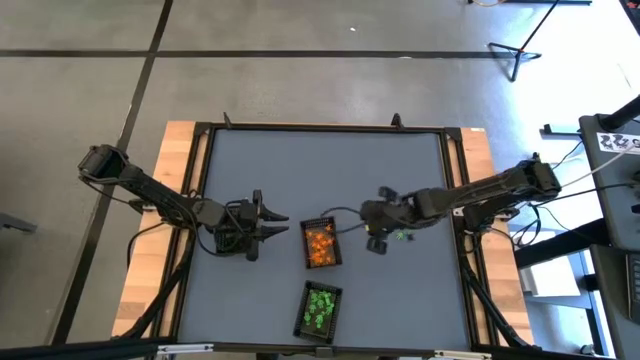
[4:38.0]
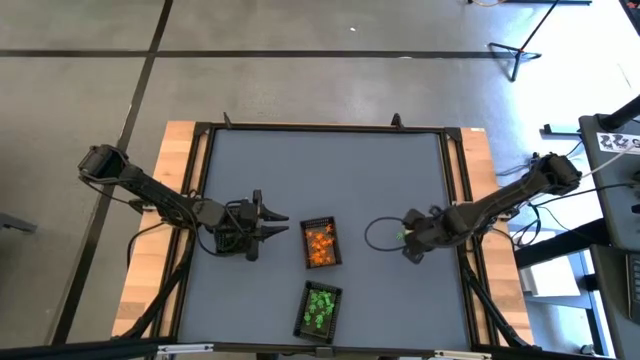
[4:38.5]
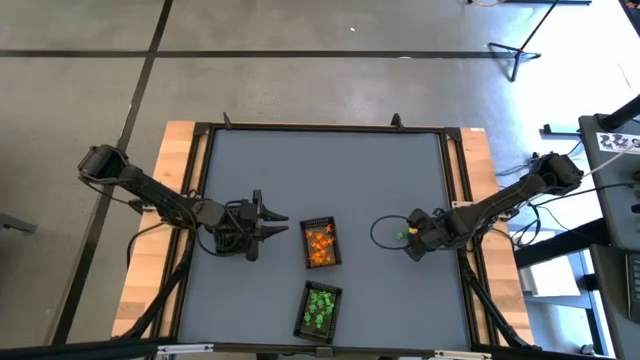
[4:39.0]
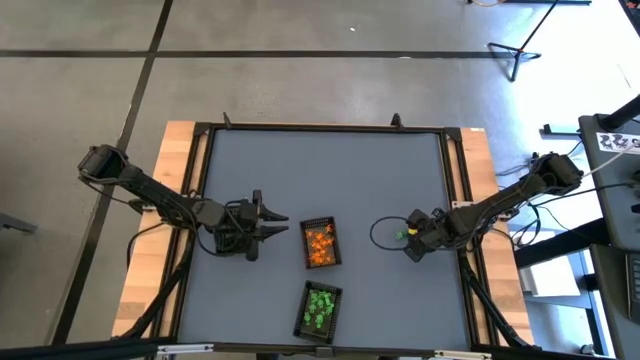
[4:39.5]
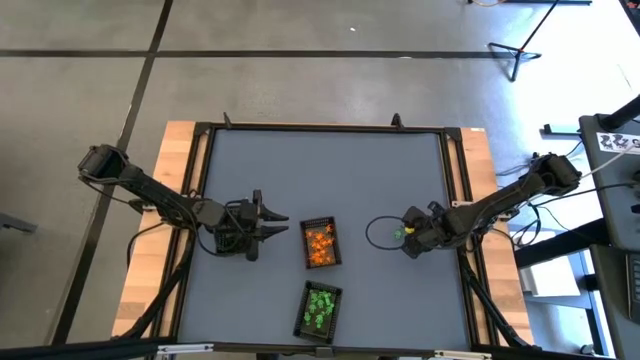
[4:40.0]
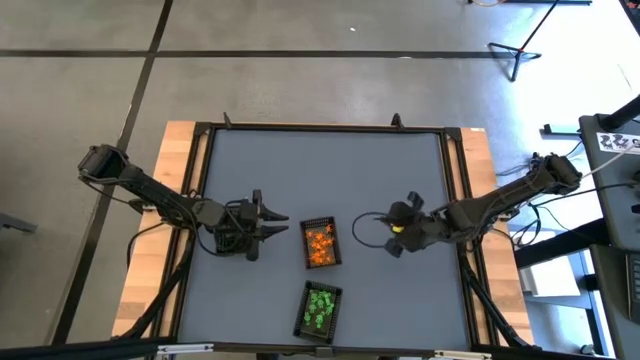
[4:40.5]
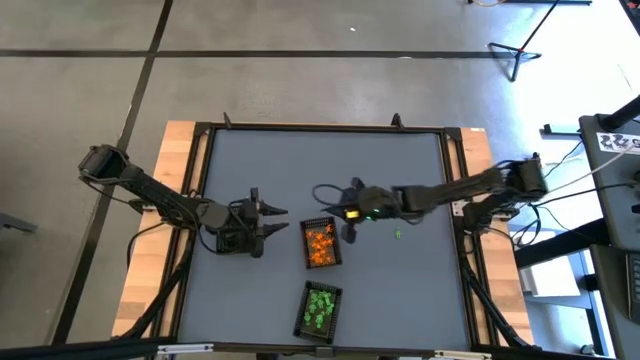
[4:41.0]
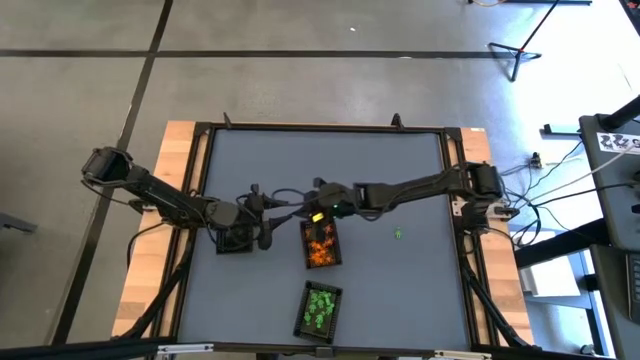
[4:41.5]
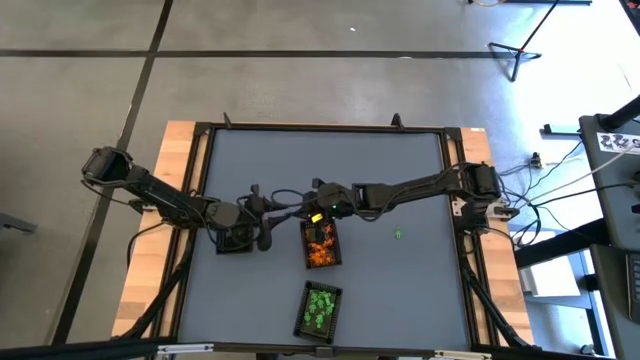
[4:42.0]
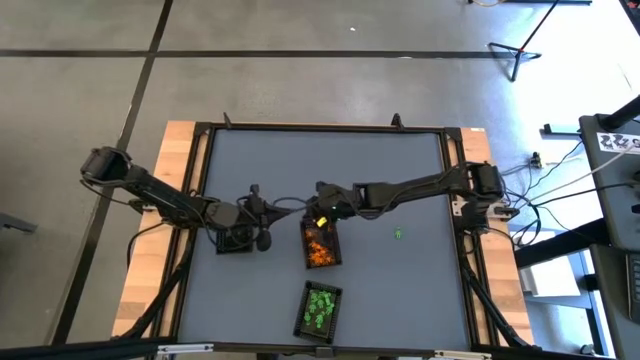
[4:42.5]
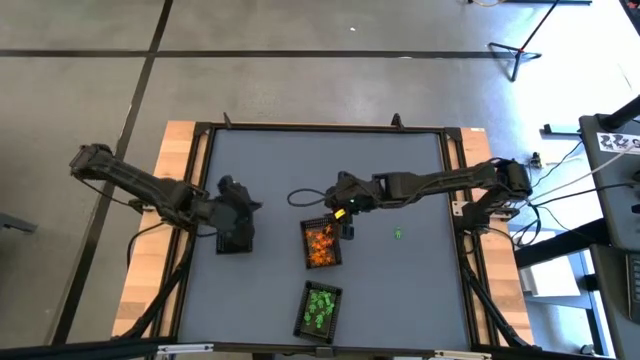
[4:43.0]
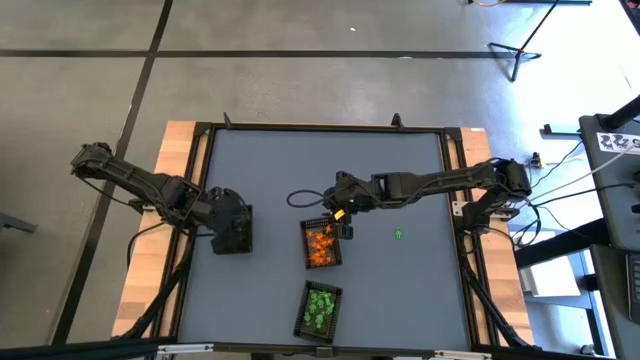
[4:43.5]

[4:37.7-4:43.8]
Task: Sort Halloween decoration
Put the black spider toy into the top left black basket

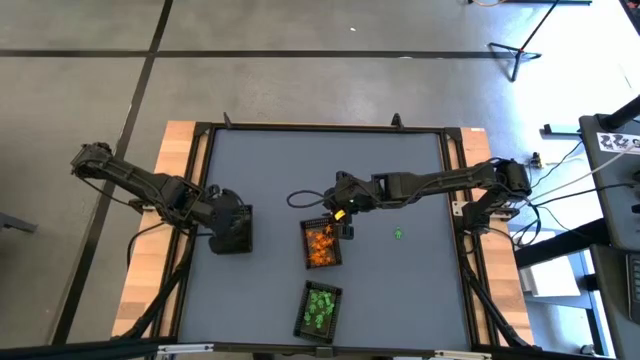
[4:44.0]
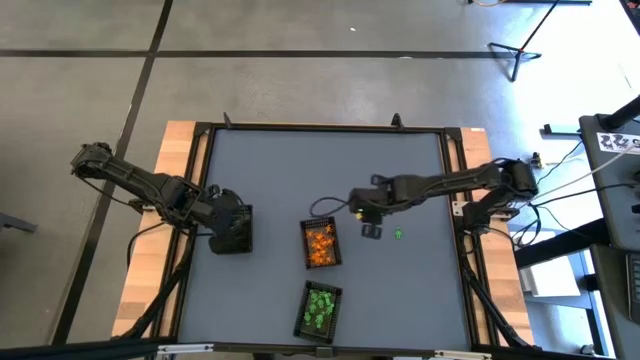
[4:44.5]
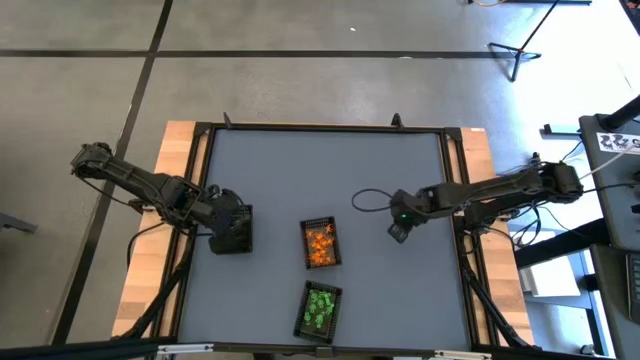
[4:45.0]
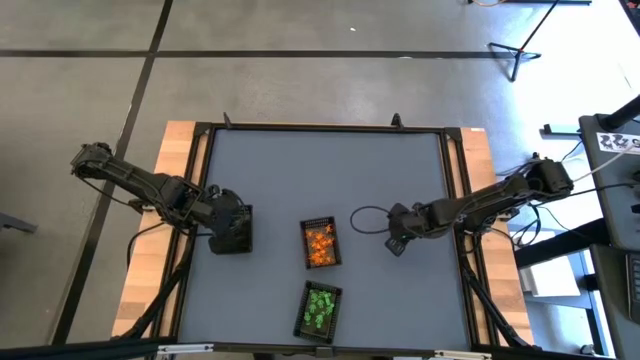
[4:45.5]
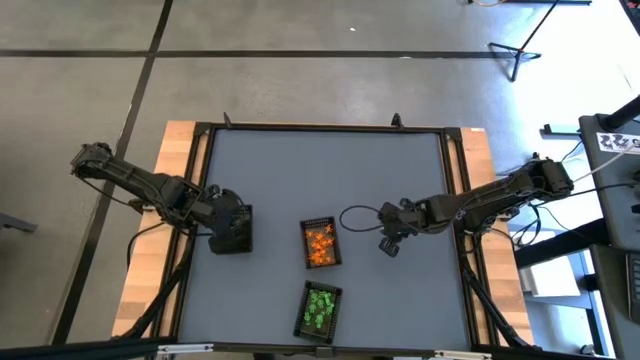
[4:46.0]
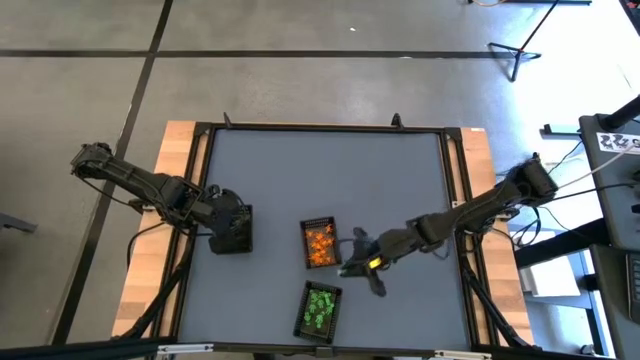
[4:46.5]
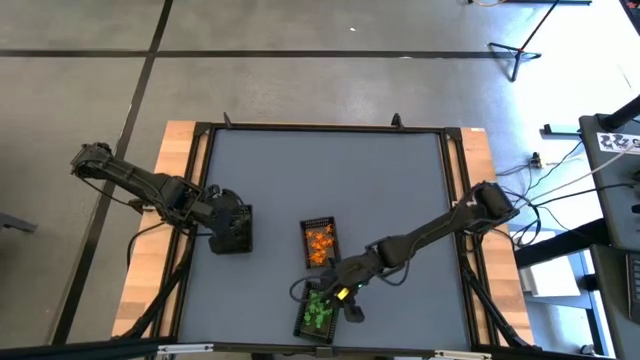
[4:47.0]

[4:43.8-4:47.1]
Put the green toy skeleton into the bottom black basket

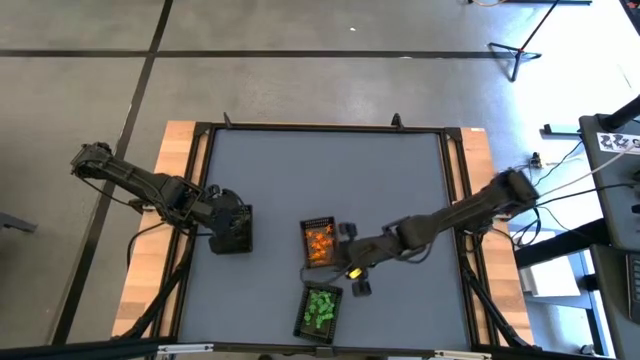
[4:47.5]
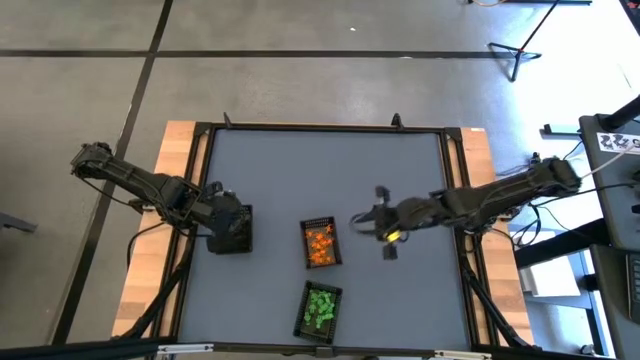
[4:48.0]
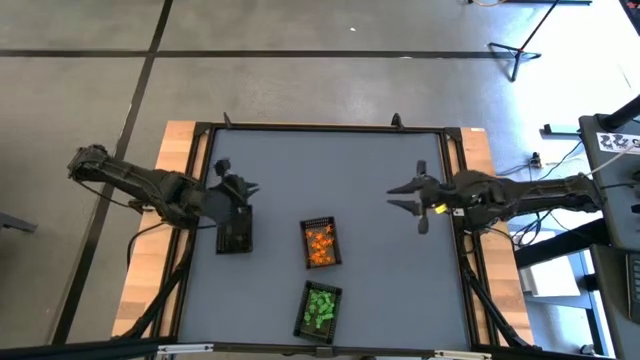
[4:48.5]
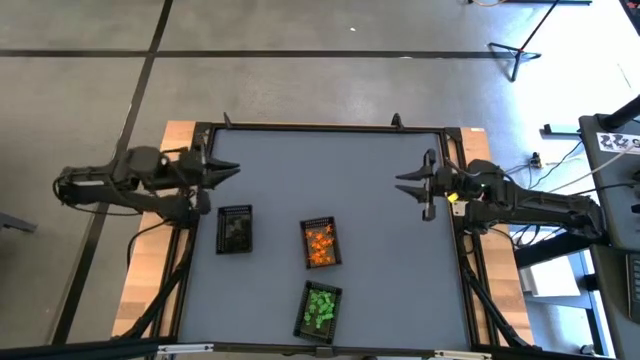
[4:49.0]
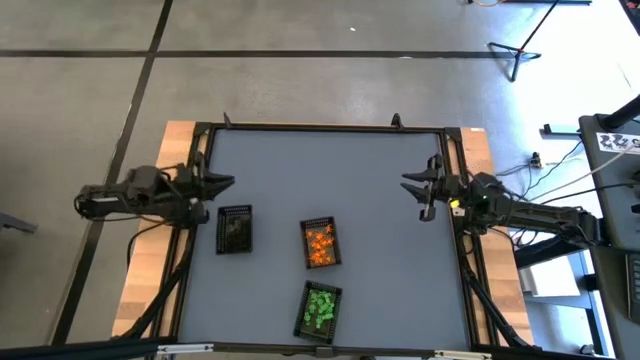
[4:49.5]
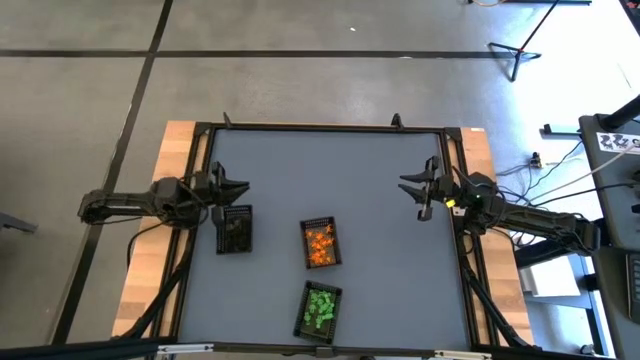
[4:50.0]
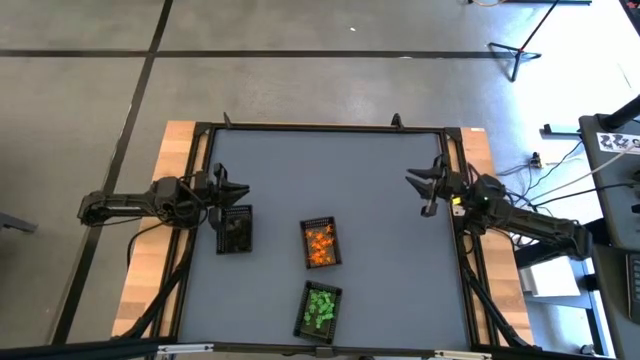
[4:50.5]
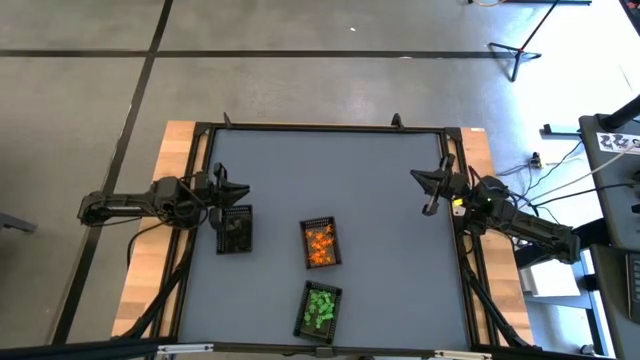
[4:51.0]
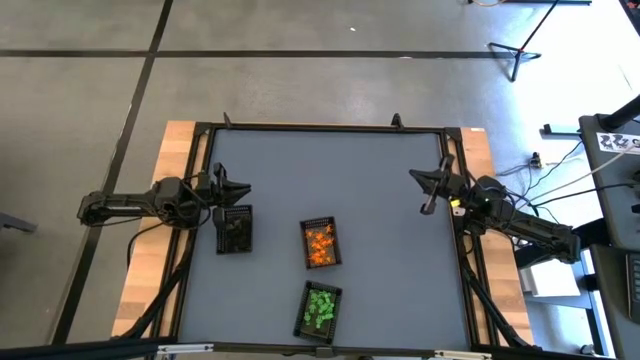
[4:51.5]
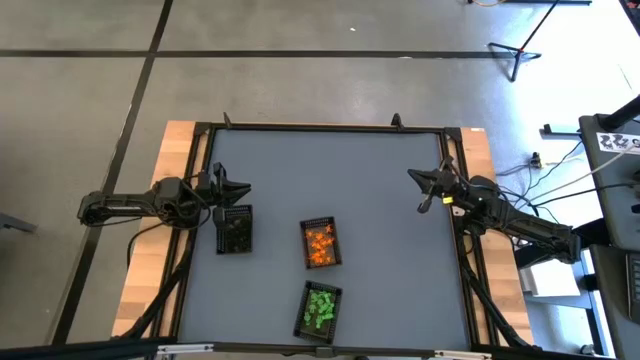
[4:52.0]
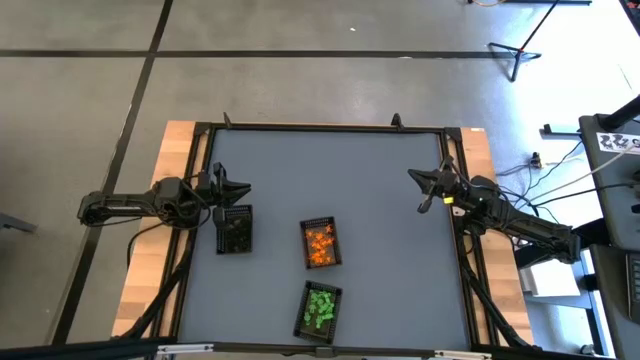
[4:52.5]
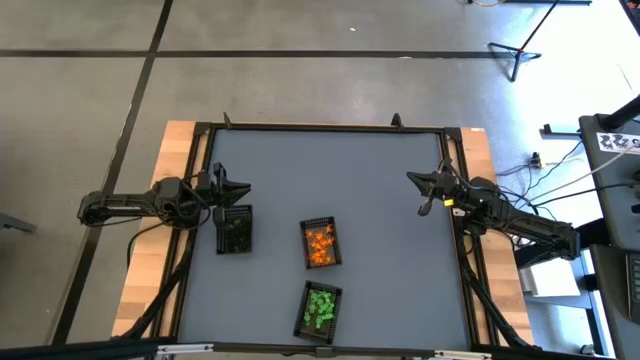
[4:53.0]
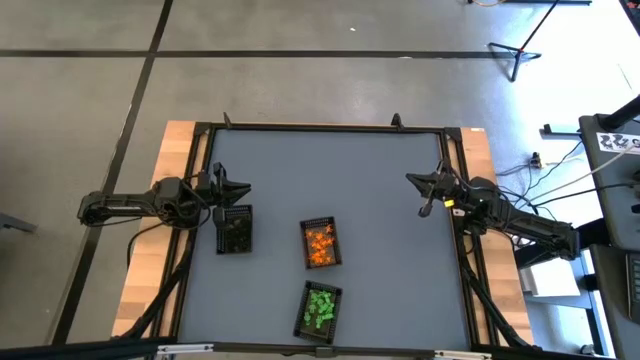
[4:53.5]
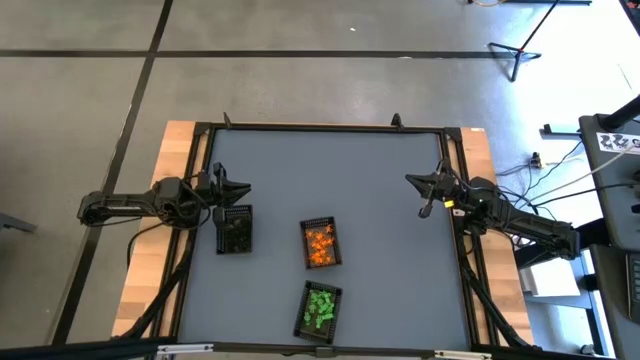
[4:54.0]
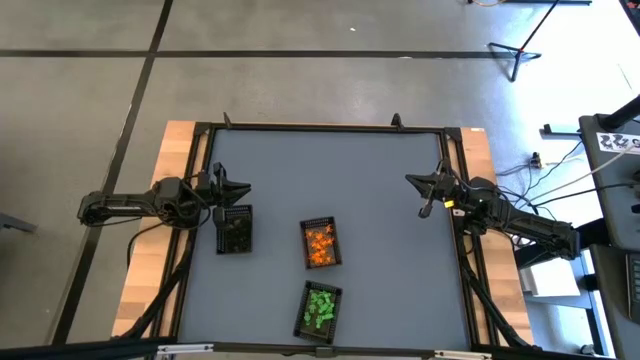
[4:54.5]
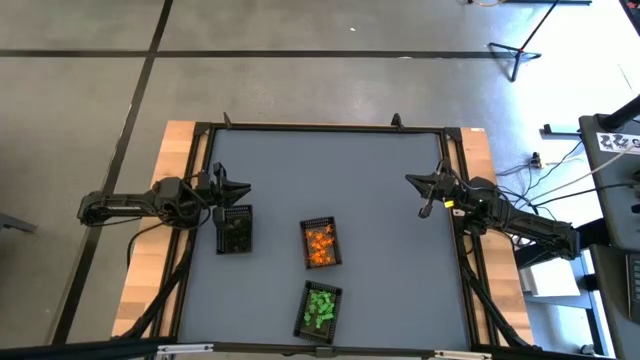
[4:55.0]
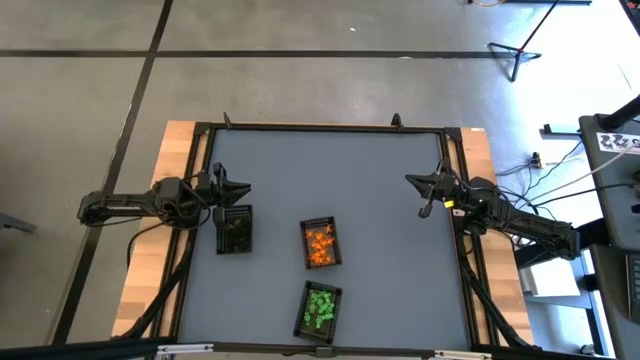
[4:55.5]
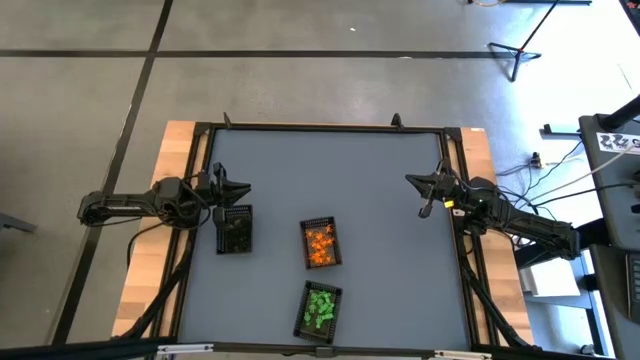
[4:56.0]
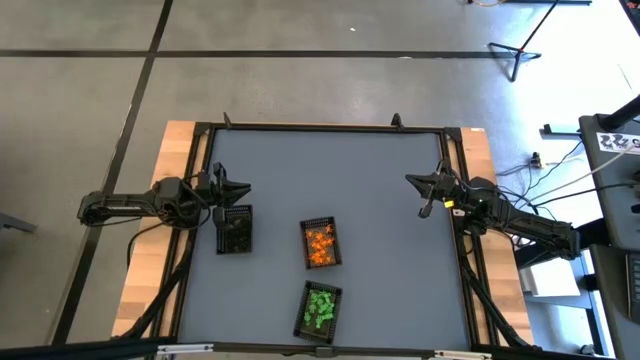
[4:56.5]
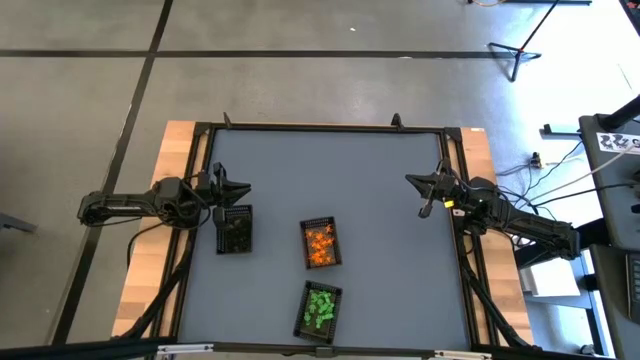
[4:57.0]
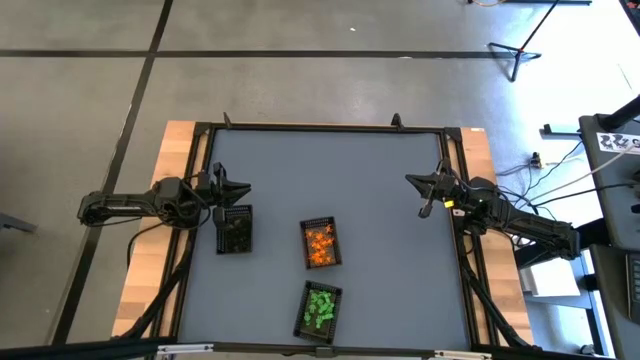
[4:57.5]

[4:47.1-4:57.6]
Return to Home Position

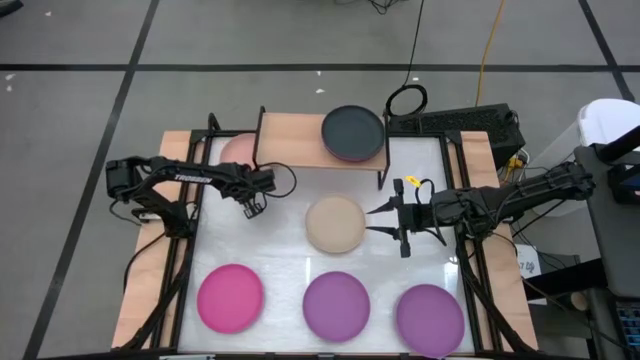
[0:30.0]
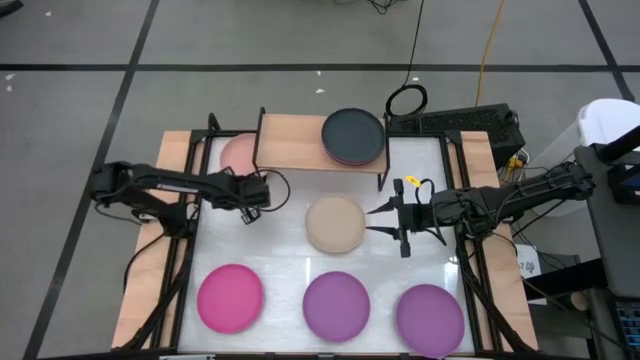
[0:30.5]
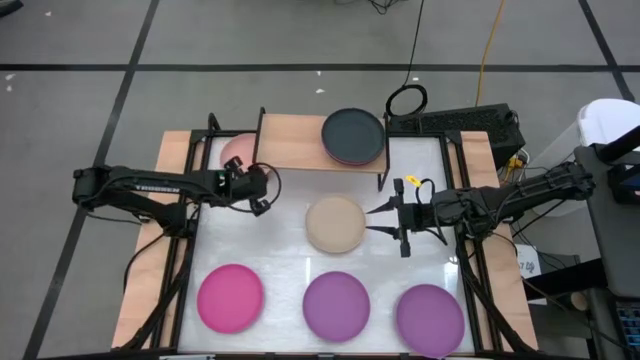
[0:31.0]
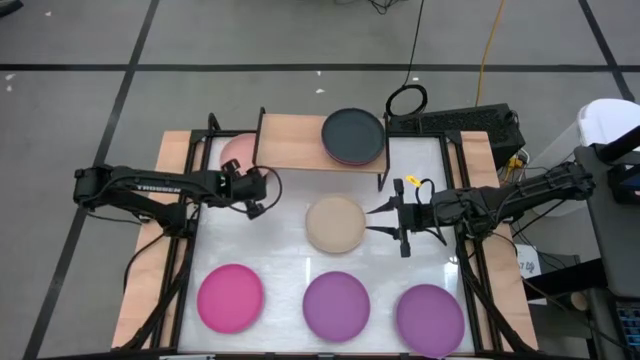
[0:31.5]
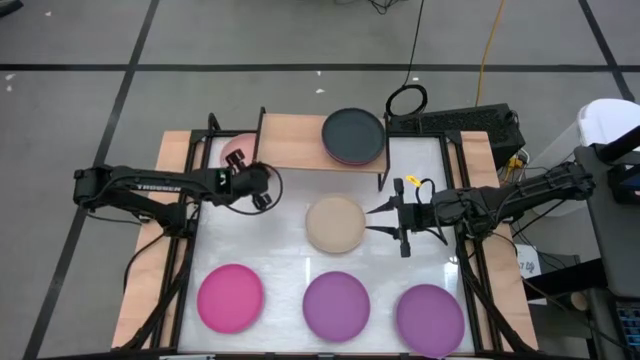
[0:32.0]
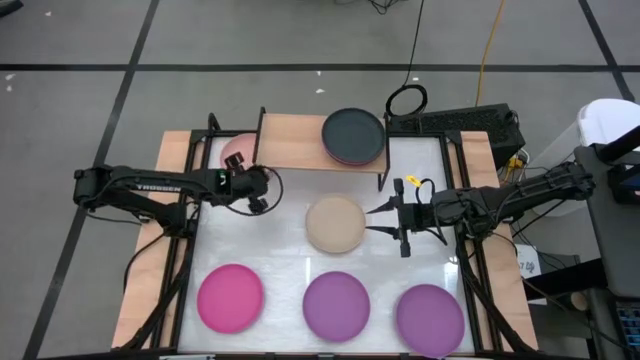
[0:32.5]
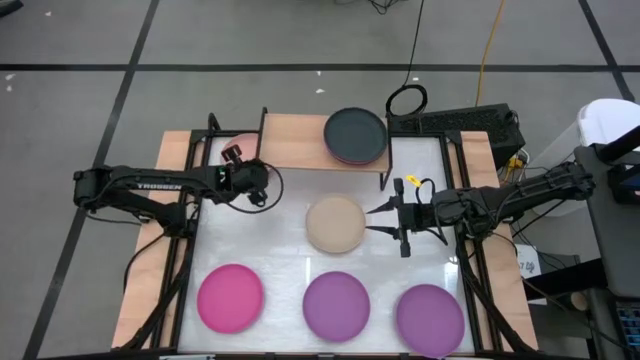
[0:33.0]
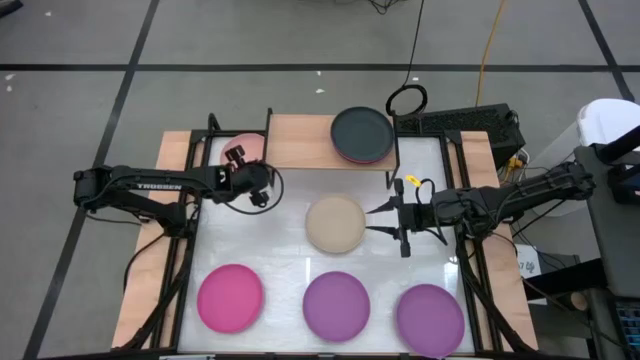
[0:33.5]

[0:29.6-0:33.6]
Task: Place and stack plates onto a shelf
Adjust the shelf on the table
